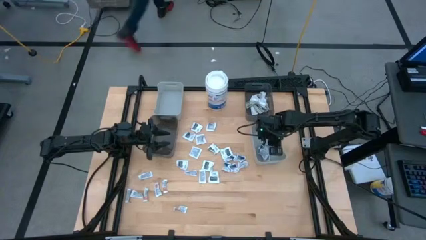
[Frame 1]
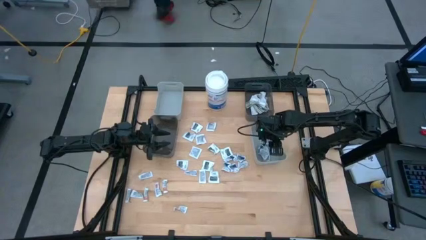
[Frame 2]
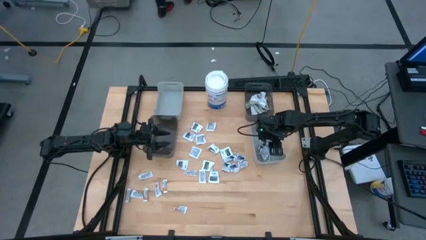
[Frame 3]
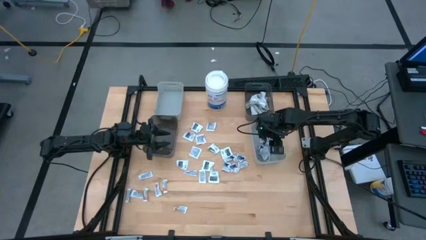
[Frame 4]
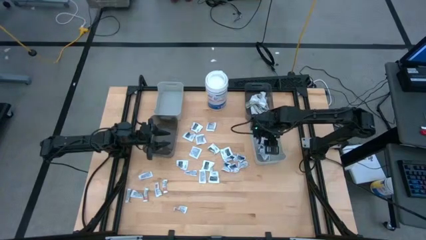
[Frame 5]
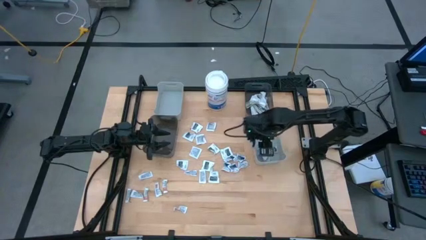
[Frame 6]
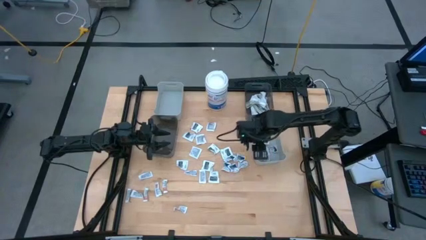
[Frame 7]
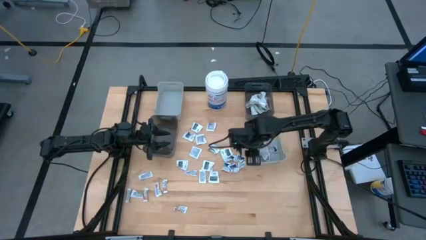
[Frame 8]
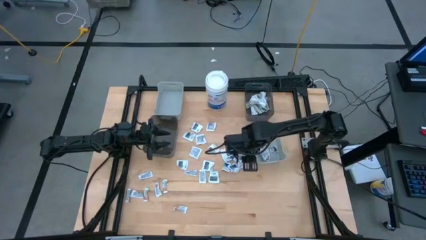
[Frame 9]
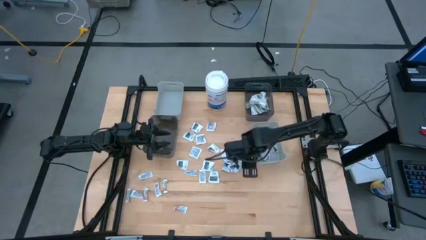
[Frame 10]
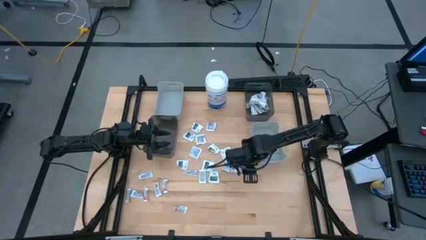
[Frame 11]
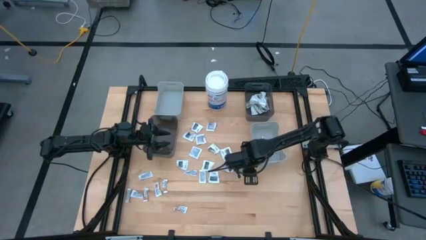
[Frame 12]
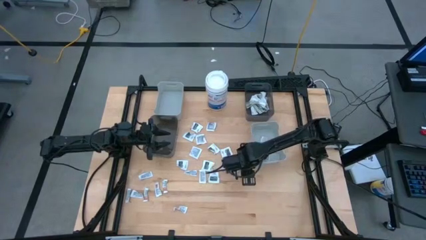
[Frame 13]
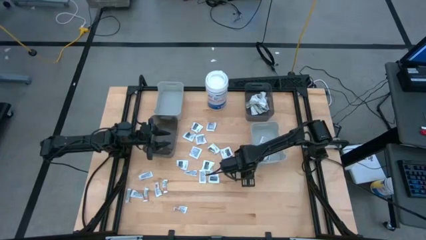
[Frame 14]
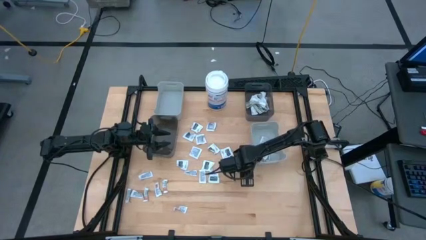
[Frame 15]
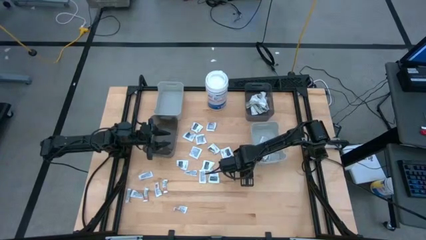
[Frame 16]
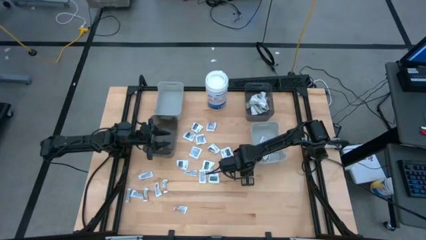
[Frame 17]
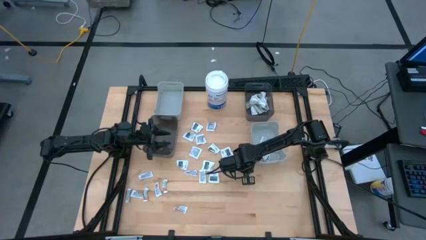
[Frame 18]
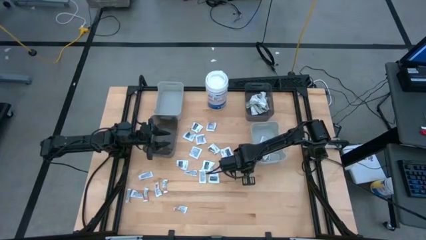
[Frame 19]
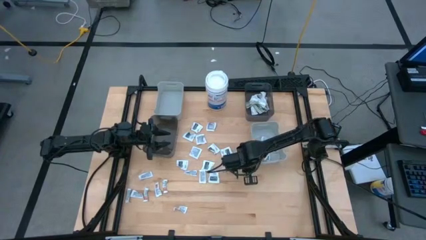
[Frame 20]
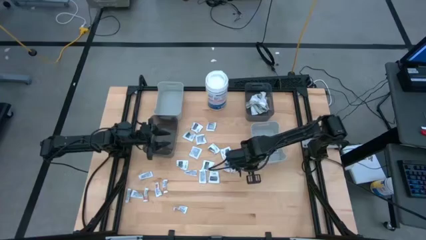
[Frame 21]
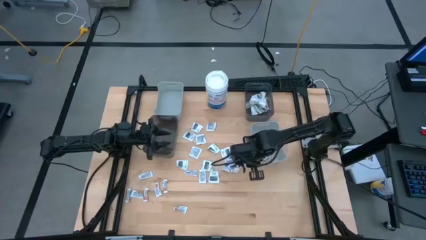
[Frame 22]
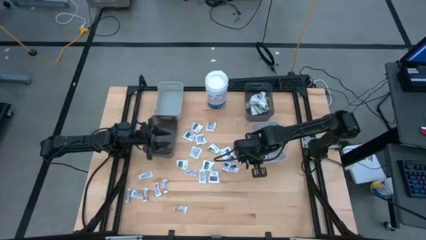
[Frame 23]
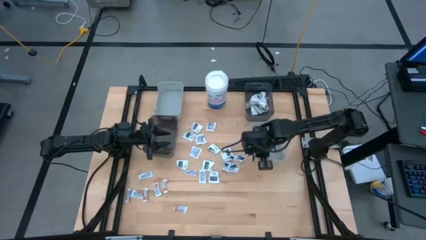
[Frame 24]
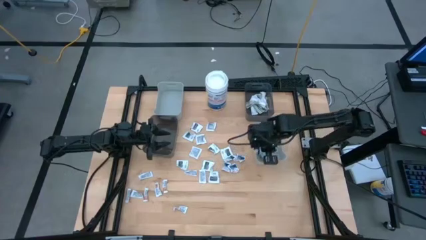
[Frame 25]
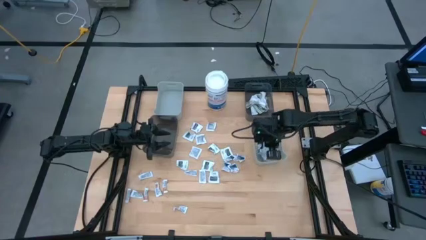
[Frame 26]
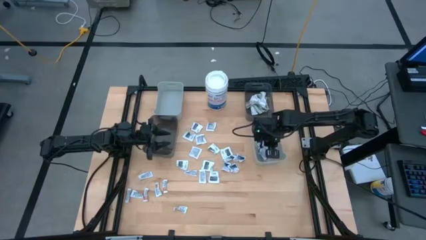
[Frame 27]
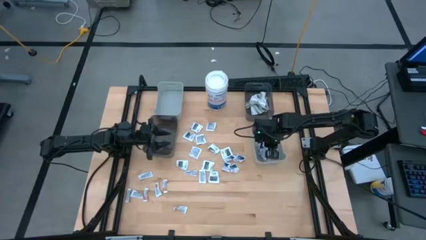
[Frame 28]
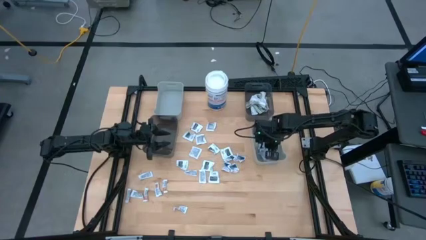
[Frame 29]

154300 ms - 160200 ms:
Task: Pick & Place First Aid Supplies
Put the blue alcohol pad into the right gray bin

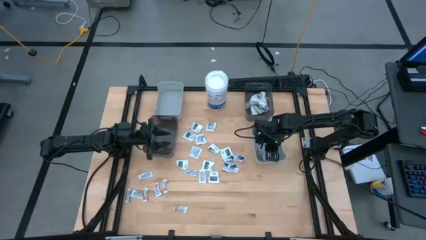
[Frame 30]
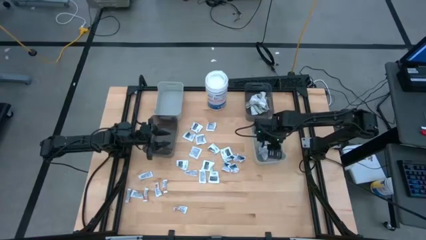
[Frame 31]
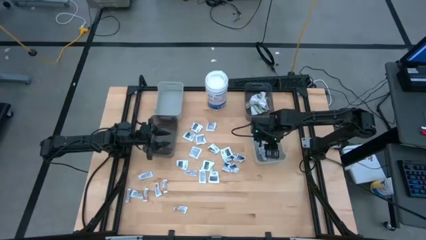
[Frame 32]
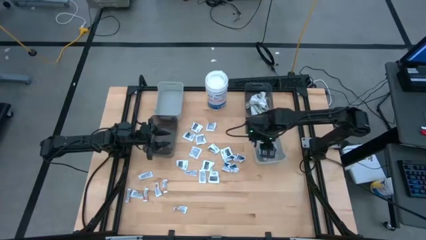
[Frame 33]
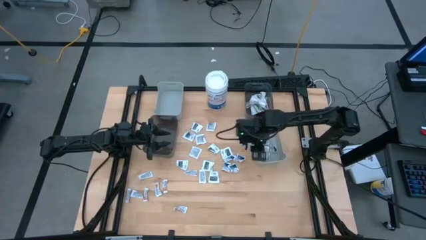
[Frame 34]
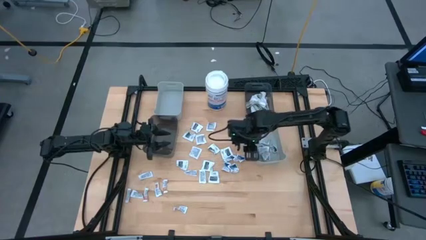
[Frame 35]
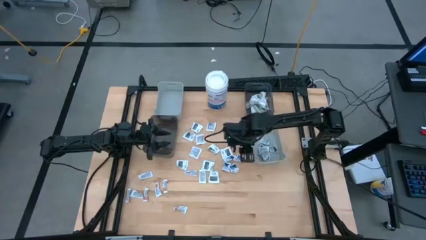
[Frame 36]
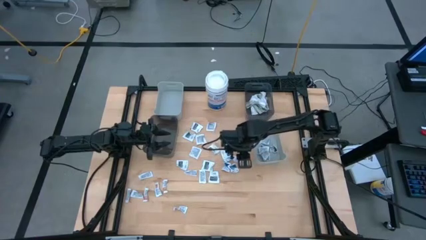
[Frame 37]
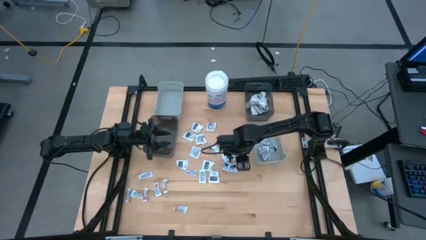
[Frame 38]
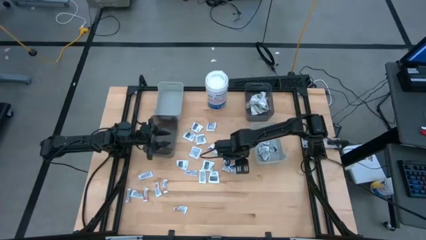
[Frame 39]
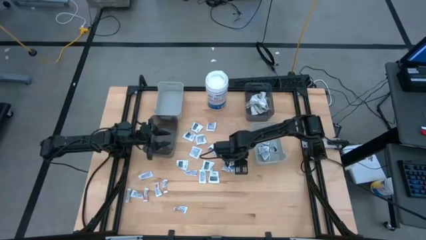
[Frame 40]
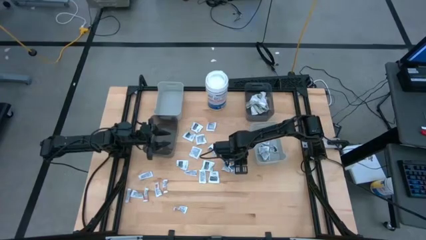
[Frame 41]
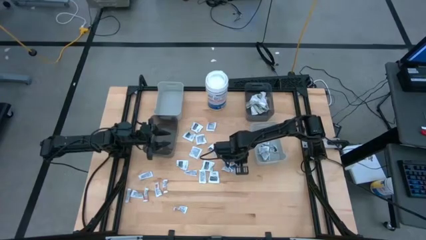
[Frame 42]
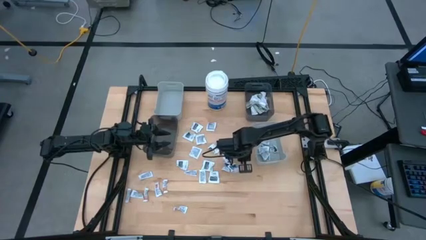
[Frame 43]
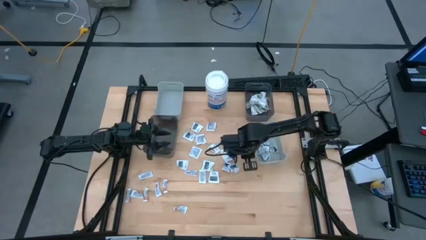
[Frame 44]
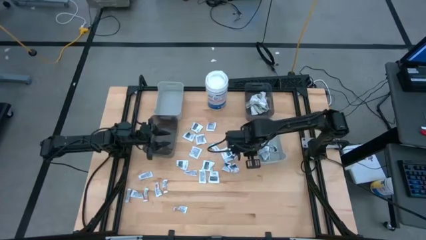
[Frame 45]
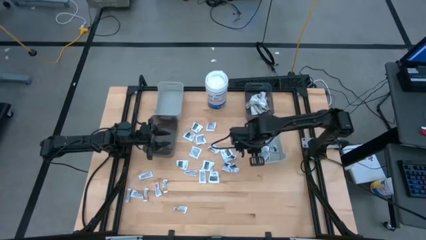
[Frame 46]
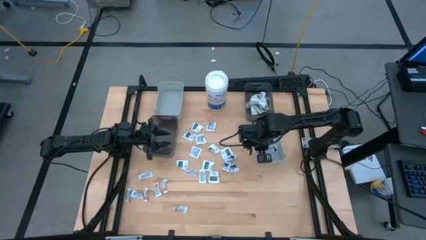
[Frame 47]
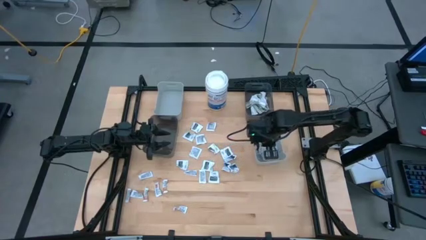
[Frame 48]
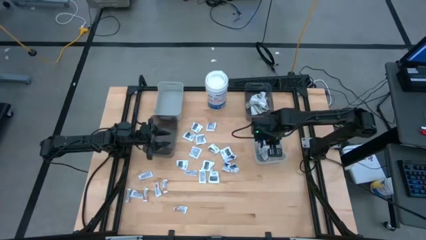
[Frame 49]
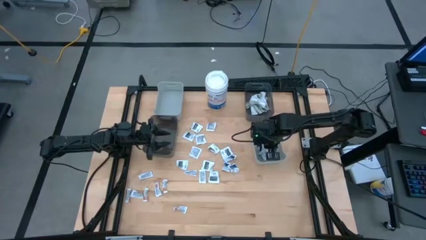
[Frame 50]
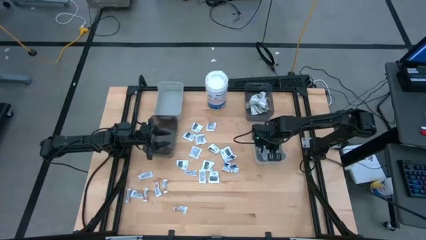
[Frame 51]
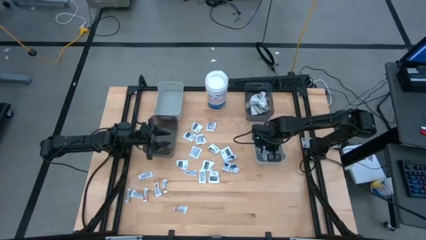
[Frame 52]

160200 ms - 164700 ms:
Put the blue alcohol pad into the right gray bin

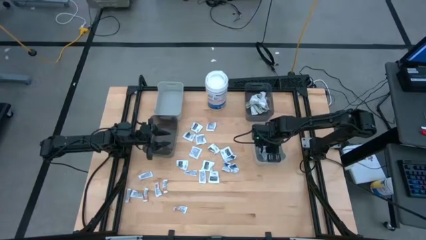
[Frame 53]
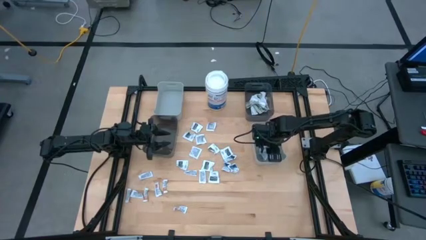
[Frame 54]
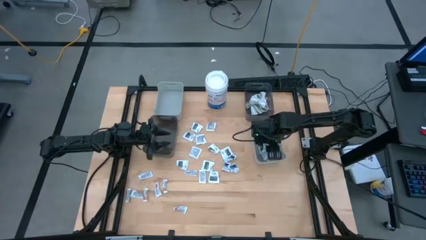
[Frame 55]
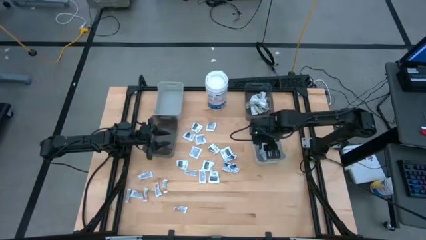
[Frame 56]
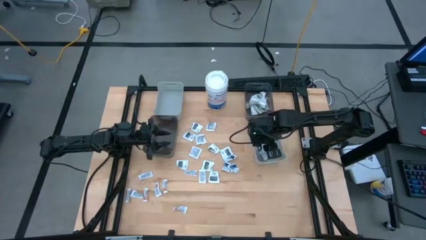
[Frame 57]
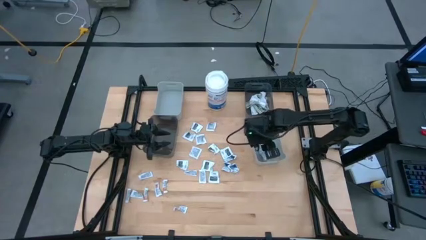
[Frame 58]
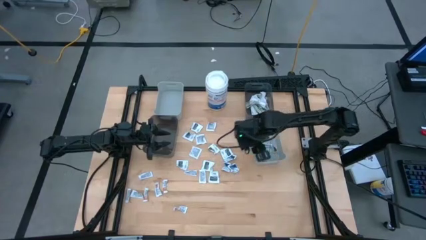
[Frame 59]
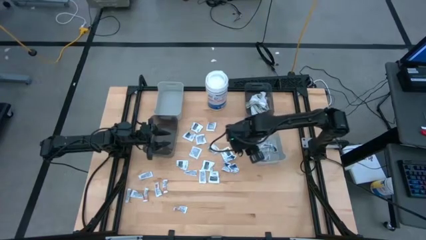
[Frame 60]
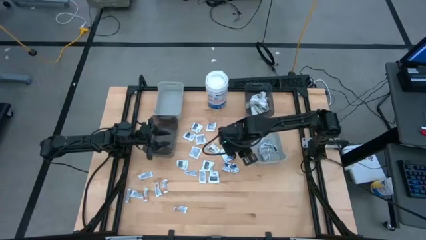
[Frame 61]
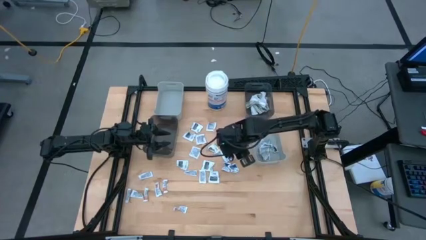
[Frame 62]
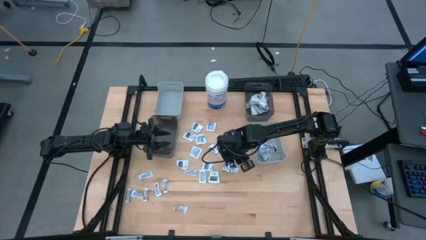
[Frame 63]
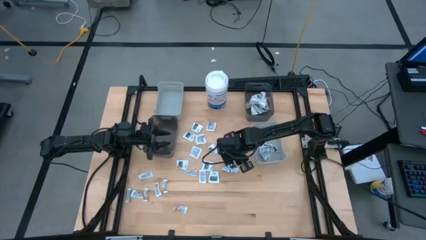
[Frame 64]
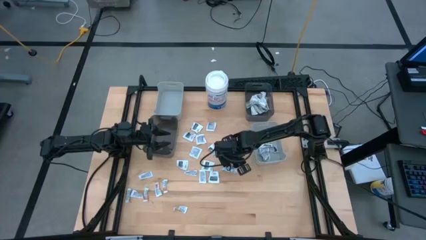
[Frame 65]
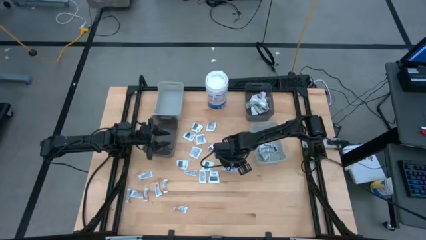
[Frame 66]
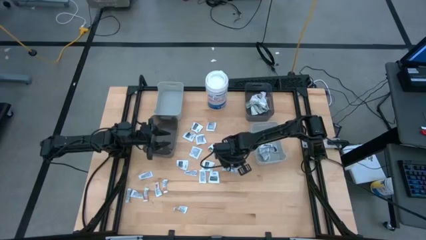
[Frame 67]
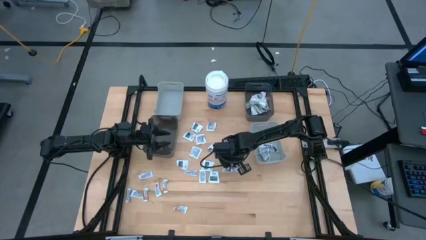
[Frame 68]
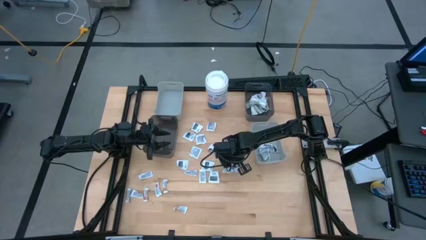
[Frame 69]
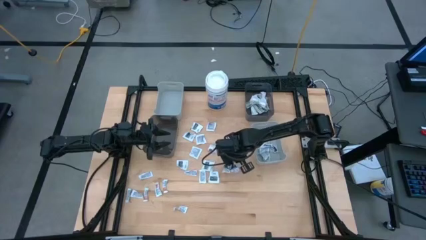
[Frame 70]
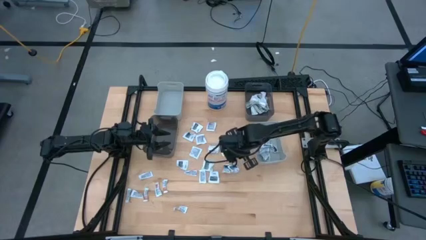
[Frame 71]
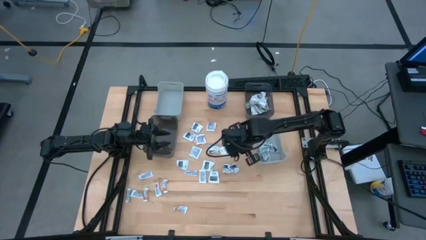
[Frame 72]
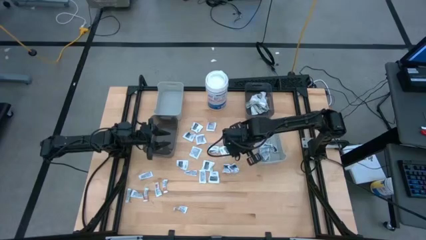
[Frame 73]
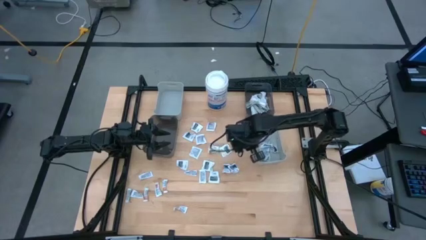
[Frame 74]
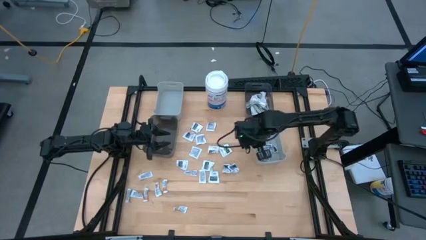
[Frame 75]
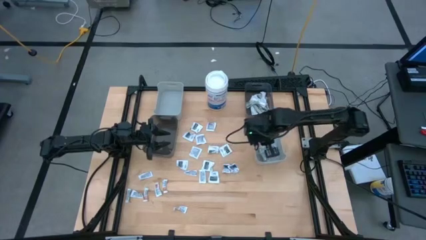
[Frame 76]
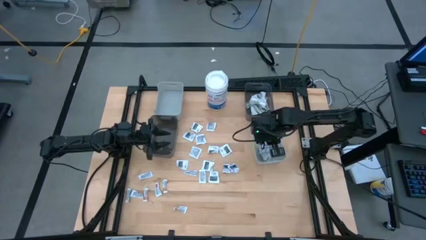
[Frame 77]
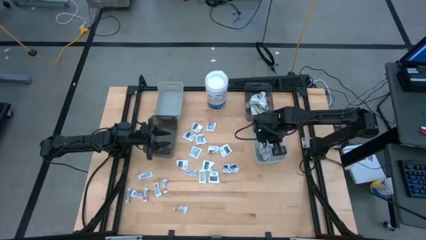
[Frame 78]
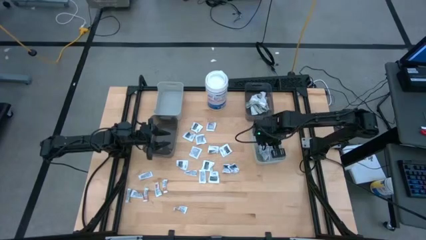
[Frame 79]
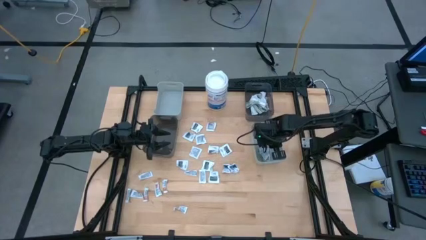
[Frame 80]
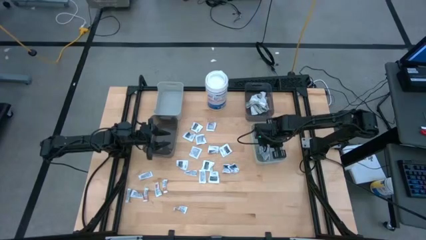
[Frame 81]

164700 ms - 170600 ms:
Put the blue alcohol pad into the right gray bin
